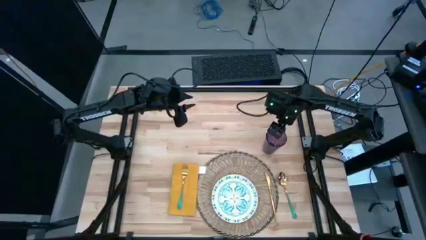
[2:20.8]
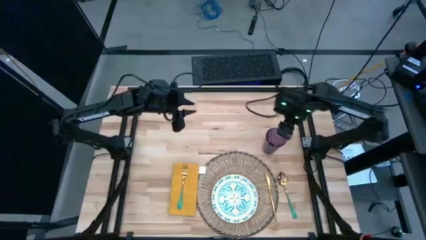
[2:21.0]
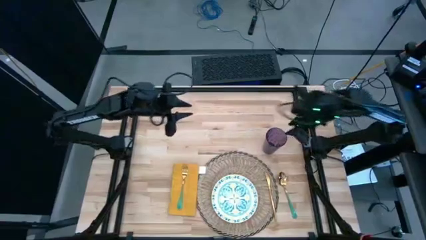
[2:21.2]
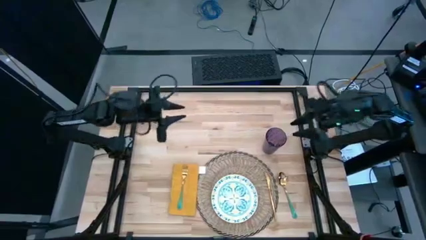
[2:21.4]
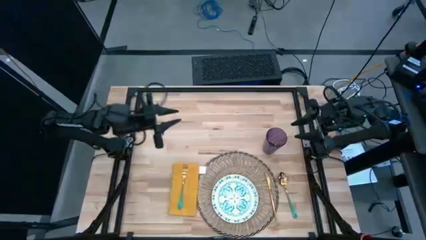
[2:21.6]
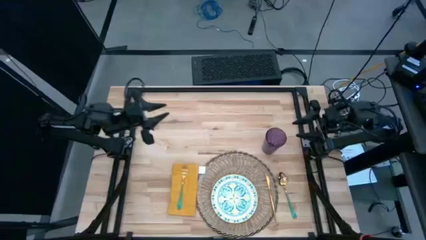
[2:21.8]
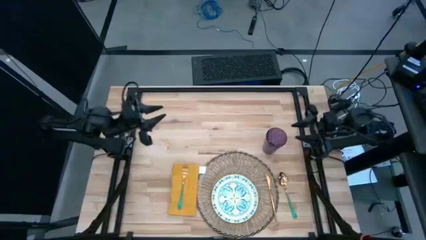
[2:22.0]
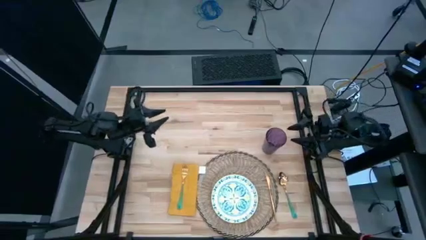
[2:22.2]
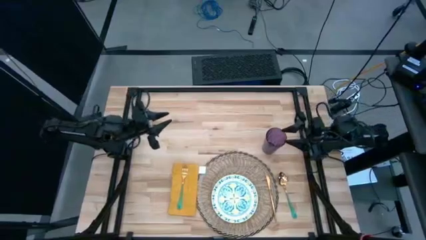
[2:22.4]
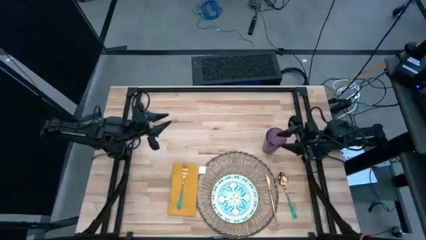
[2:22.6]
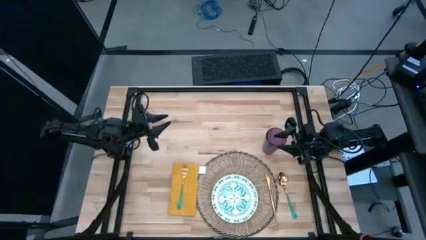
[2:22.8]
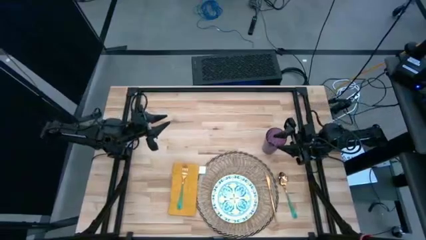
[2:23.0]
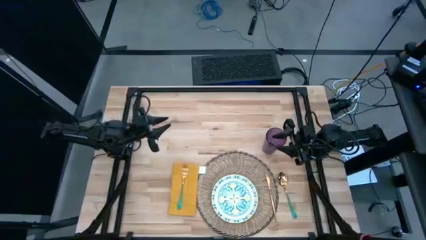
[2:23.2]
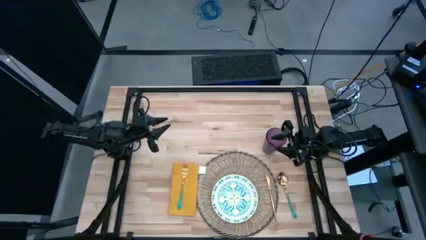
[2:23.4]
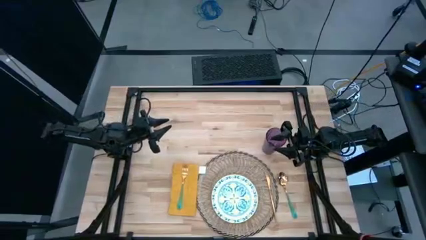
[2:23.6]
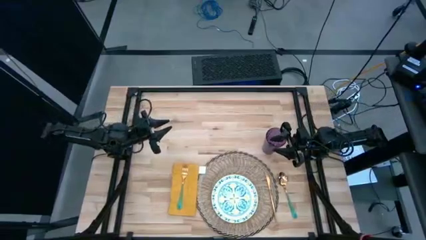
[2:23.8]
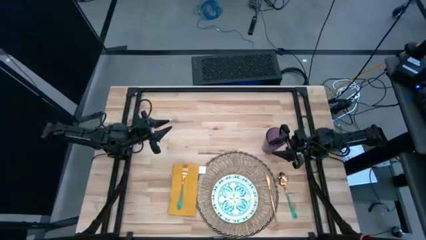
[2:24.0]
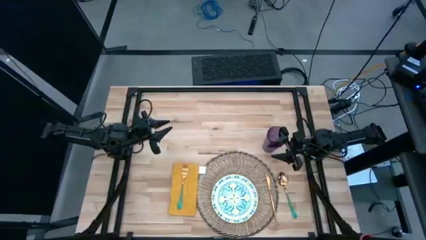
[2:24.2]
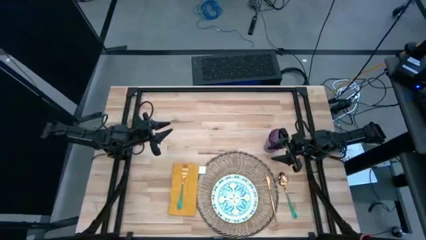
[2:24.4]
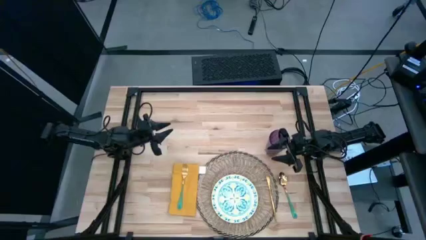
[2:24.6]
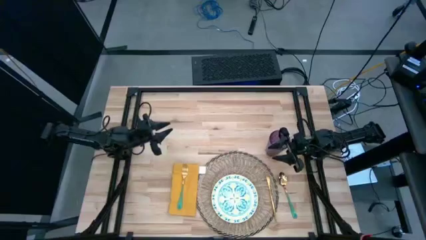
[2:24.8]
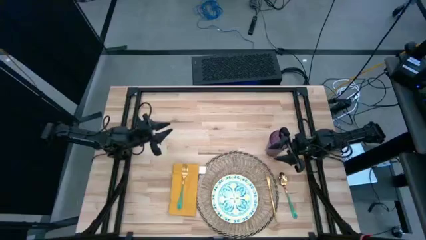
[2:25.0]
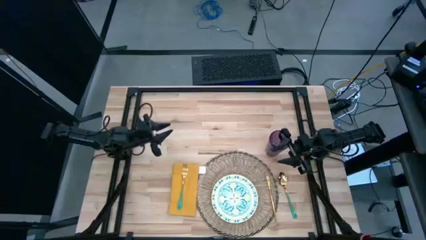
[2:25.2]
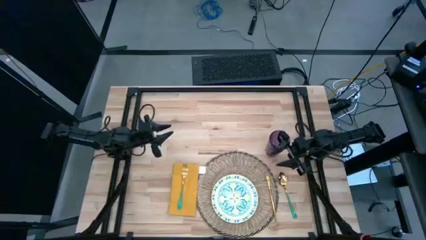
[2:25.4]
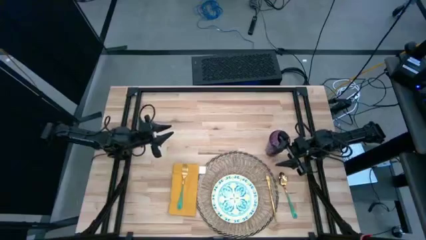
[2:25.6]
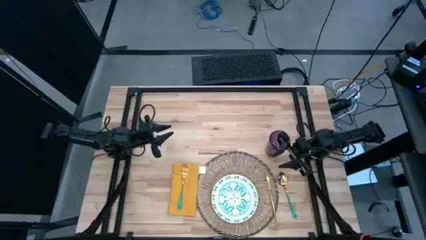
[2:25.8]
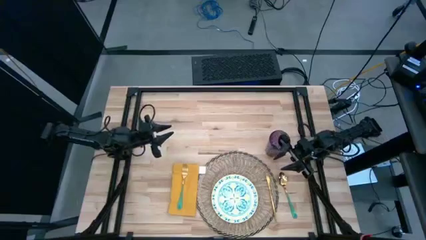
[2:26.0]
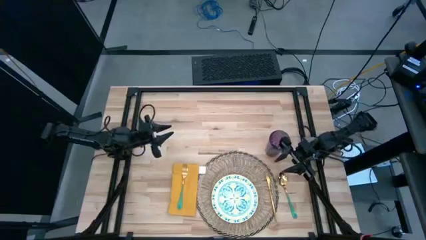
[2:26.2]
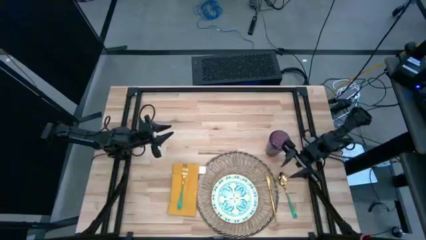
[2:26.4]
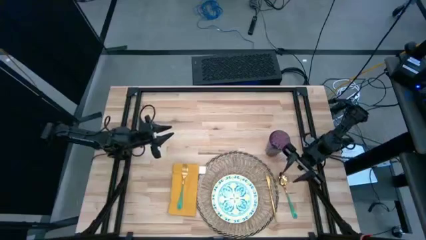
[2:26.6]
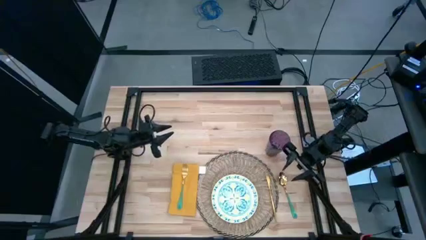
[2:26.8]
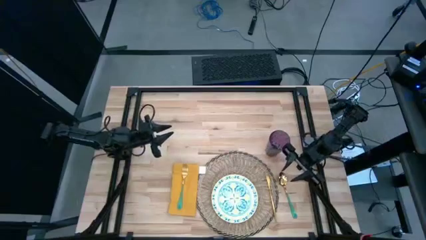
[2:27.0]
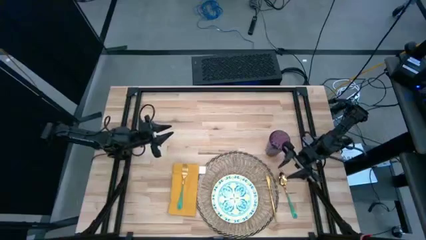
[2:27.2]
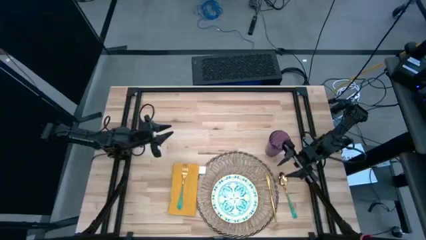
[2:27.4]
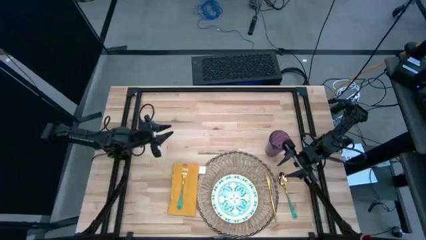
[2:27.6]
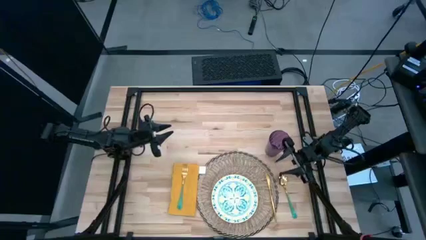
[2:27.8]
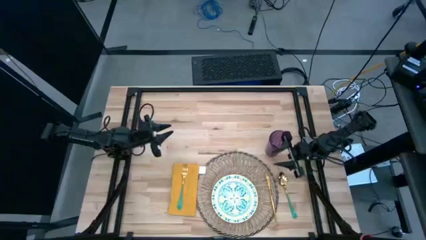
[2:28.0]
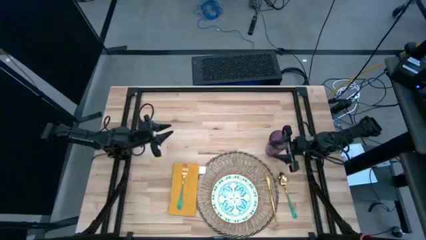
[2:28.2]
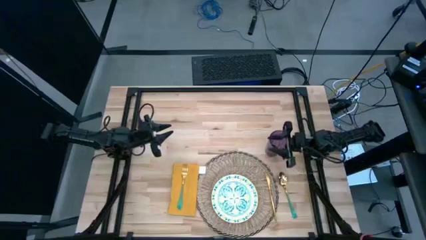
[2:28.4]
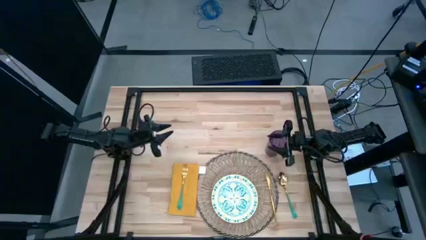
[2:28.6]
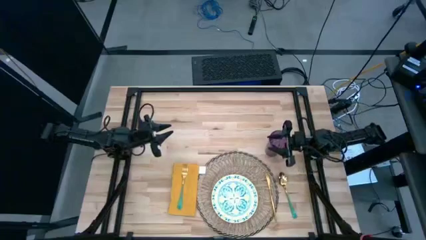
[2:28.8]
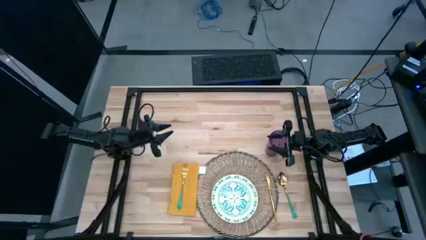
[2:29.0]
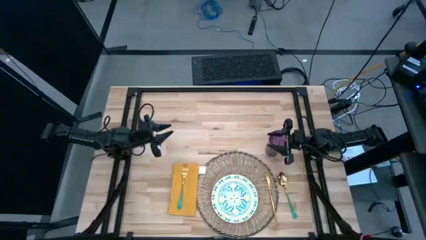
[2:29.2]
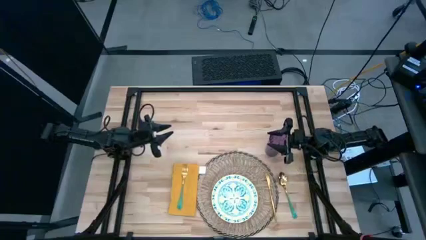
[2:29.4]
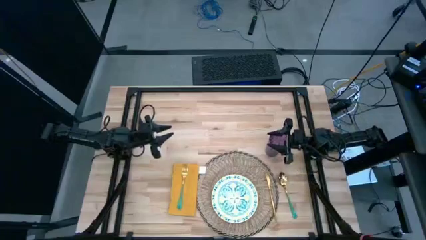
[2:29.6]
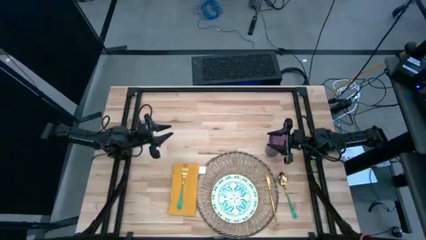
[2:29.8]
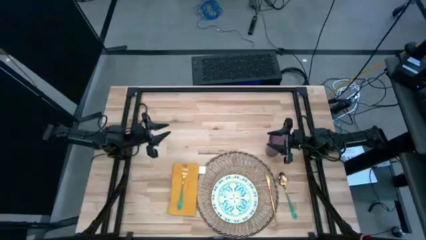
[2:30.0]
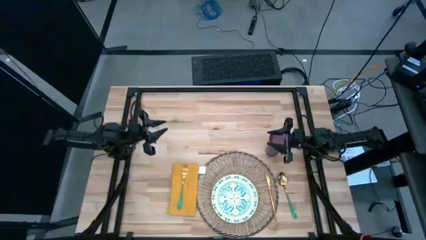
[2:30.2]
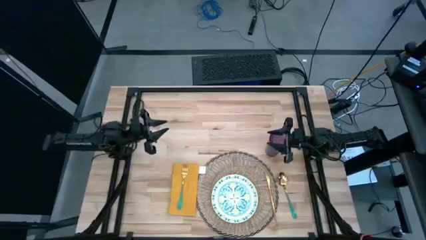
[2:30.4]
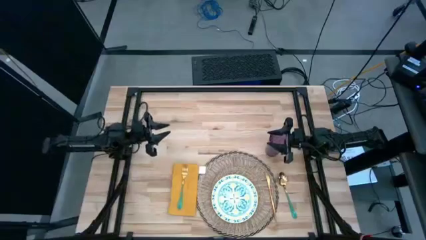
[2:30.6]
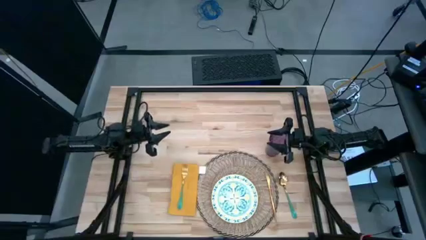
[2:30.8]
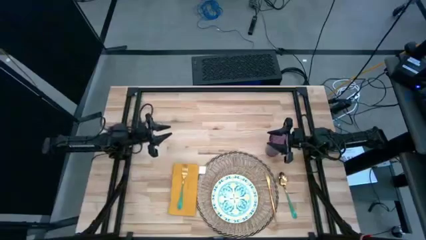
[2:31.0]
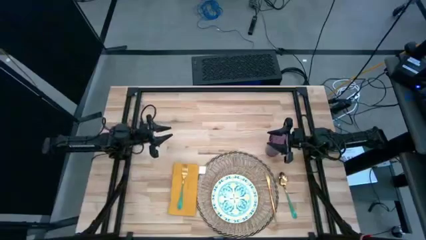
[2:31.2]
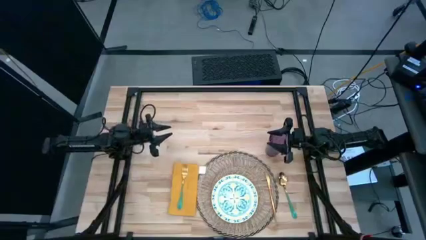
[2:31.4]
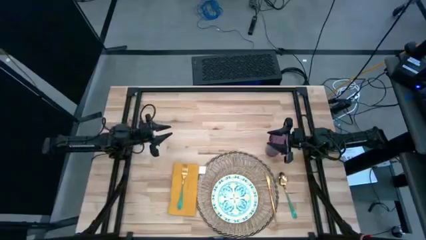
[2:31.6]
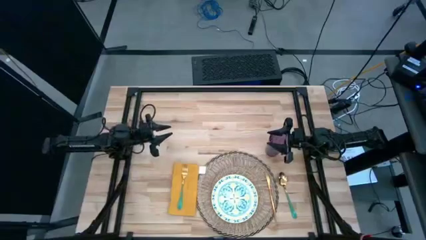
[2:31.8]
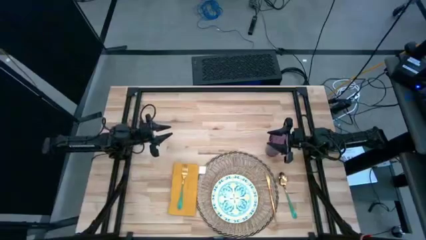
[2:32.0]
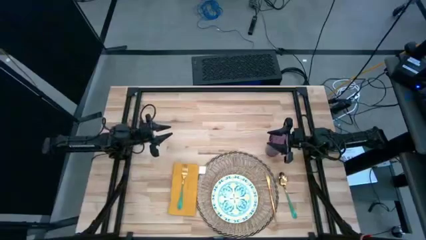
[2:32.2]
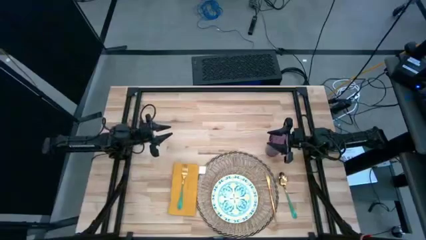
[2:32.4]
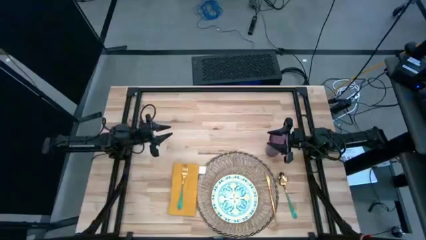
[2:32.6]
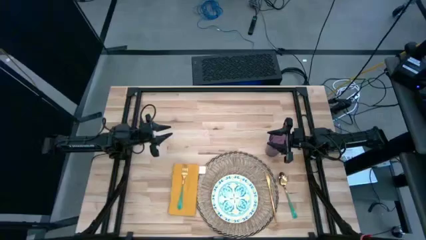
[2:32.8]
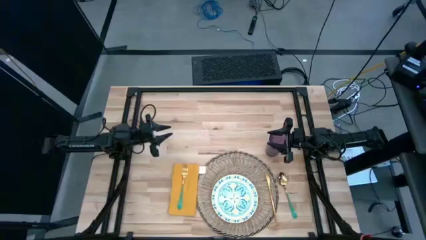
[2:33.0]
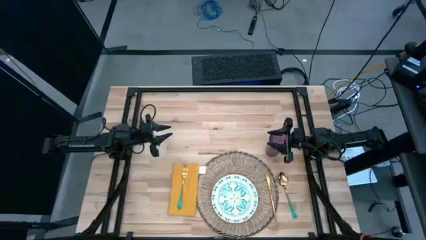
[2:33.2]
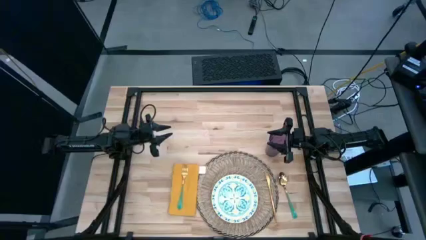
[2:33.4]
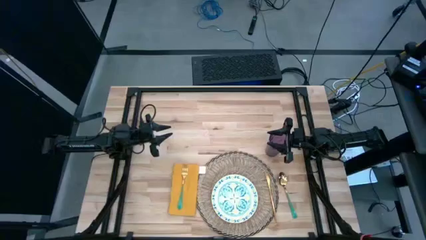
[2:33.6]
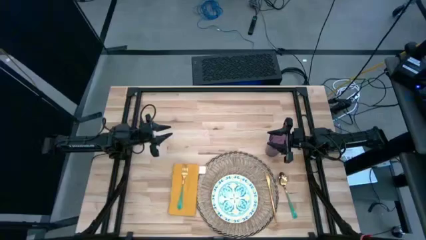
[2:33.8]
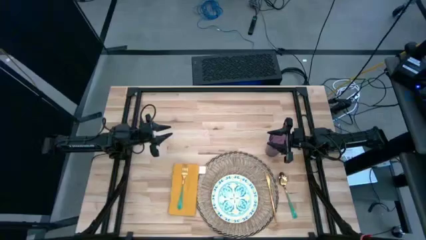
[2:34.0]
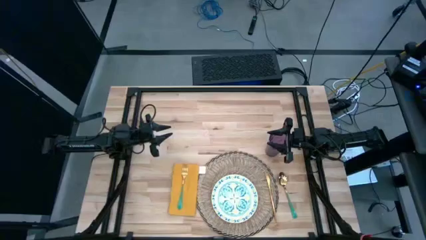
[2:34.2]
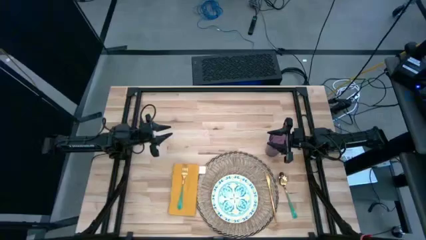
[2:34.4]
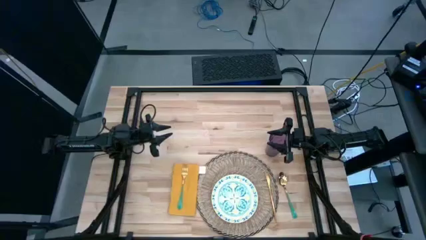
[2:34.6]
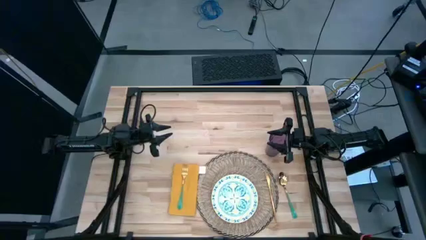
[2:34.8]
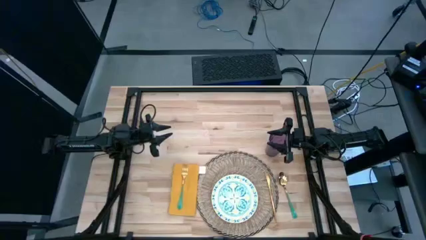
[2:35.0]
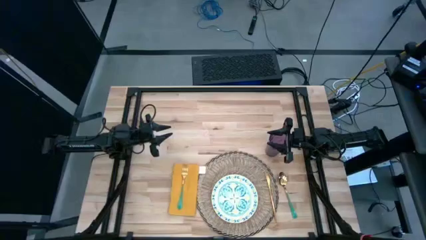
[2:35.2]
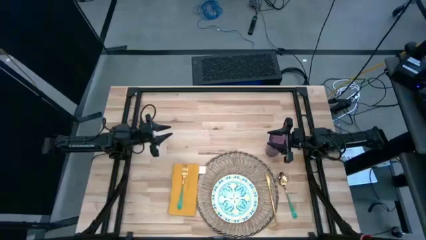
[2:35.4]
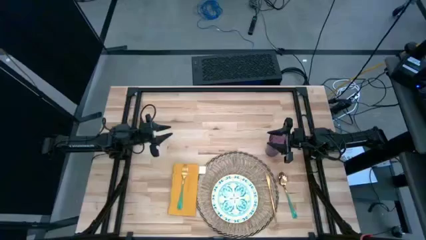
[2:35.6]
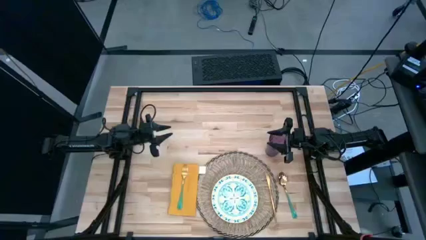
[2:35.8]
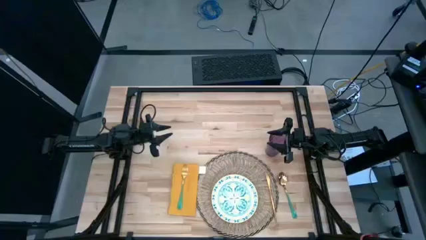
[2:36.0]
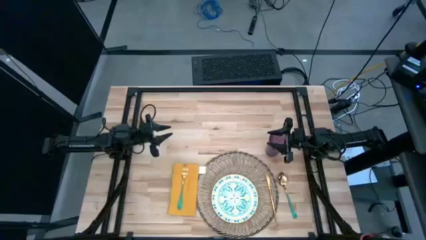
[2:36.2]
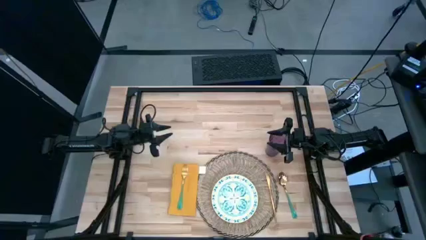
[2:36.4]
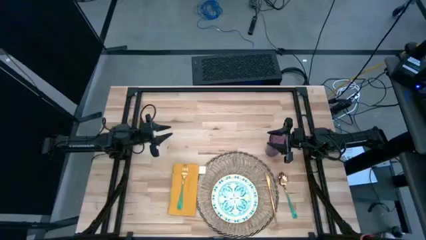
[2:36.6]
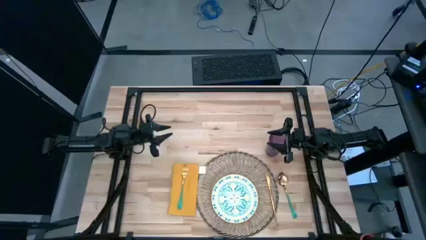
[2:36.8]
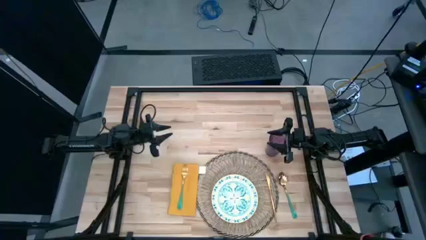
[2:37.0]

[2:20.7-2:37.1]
Task: Set table place
Return to Home Position
